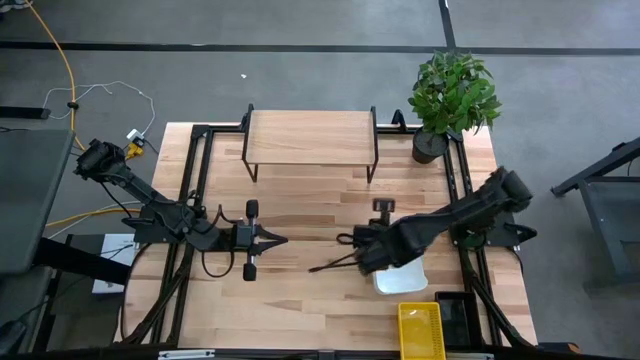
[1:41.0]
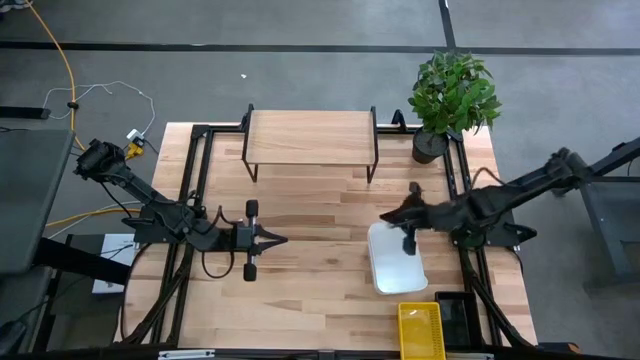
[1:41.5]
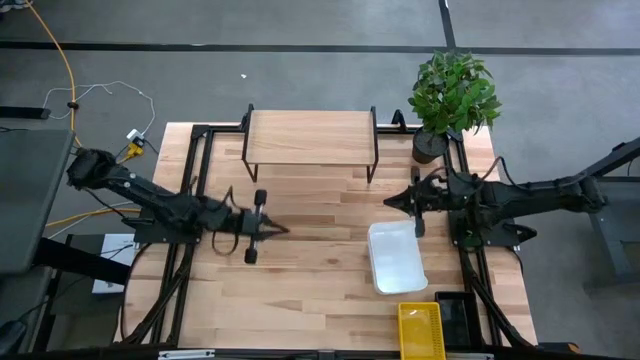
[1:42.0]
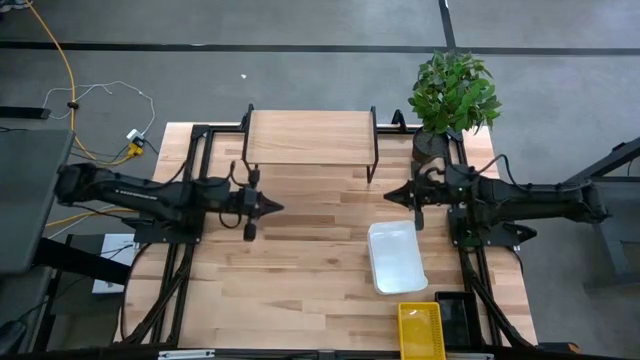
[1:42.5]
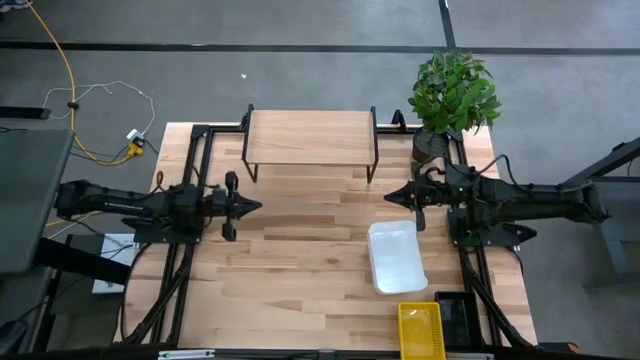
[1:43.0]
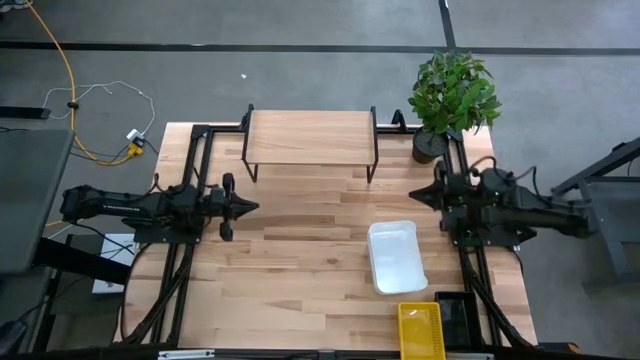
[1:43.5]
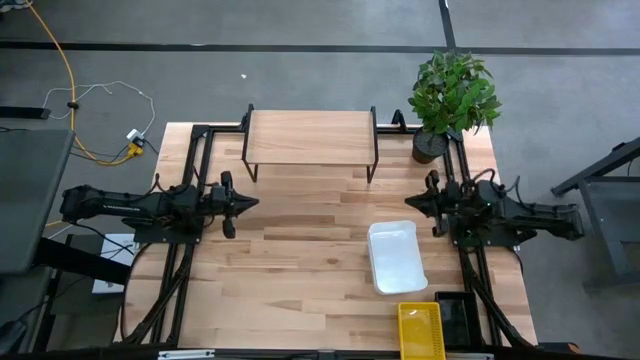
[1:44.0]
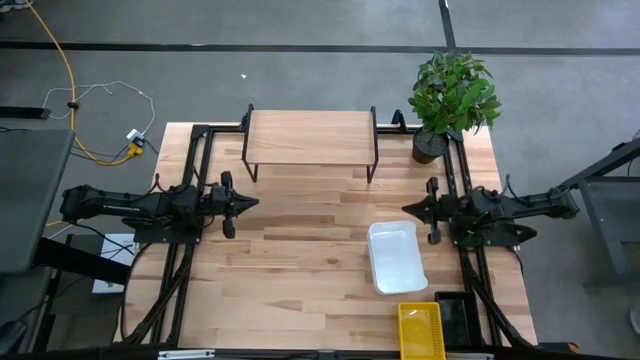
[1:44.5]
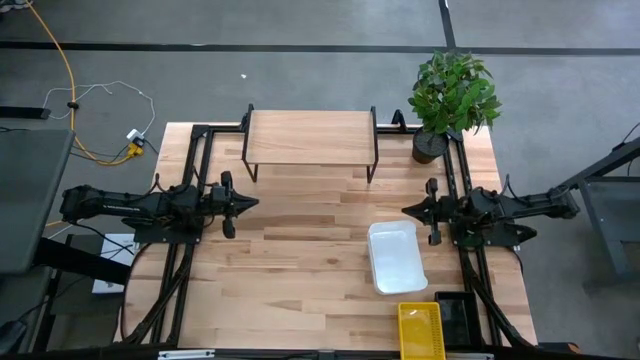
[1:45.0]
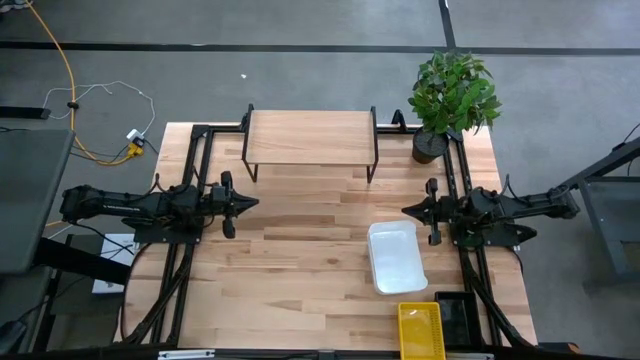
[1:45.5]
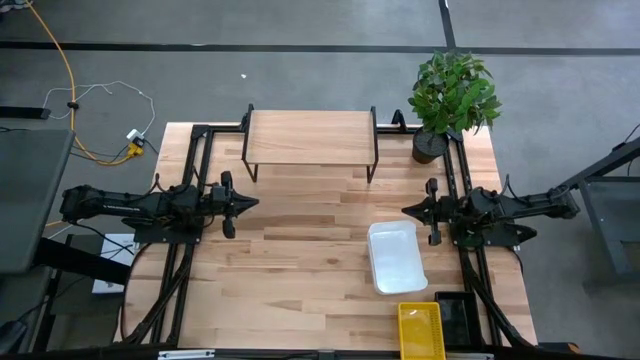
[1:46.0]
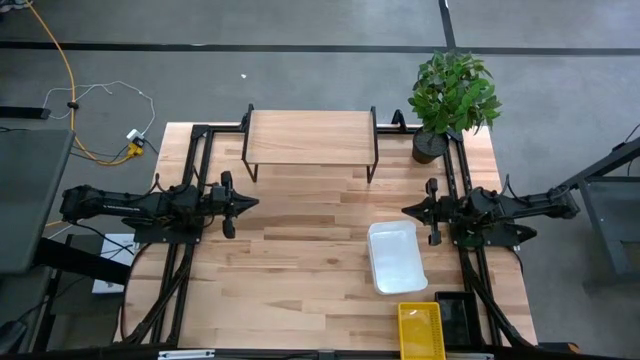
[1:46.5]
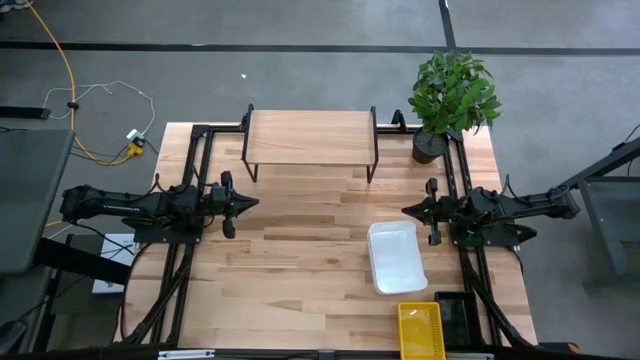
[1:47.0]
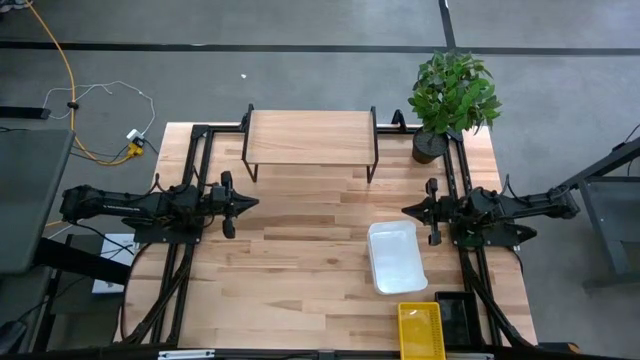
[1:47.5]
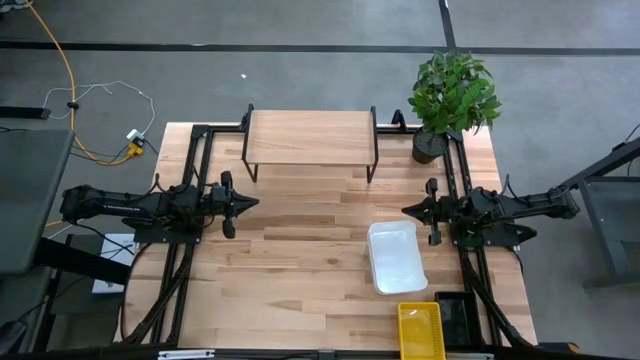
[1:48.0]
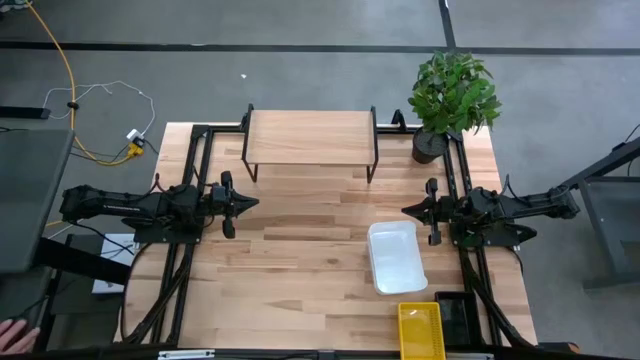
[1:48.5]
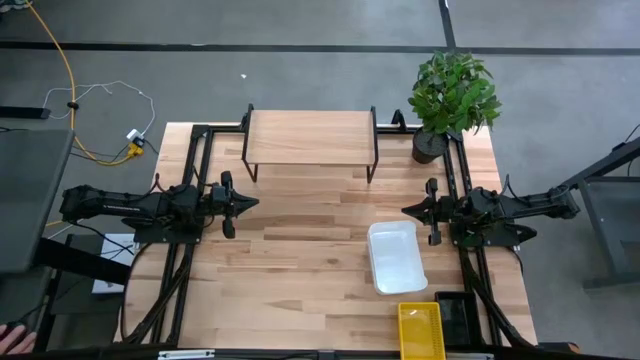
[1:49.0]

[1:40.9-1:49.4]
Task: Stack baskets on shelf by color
Return to Home Position

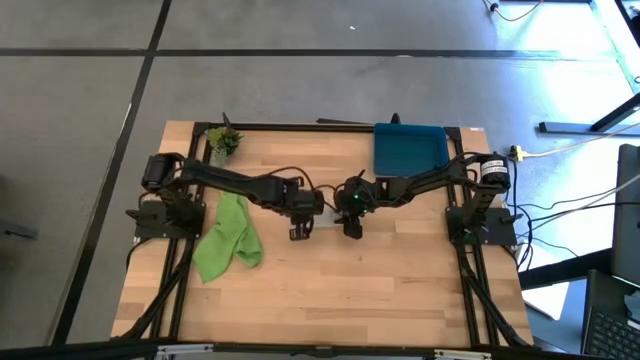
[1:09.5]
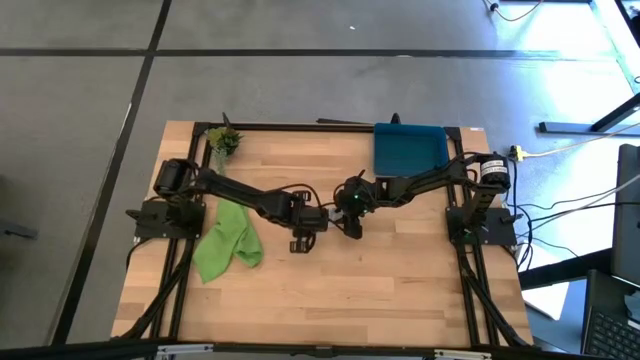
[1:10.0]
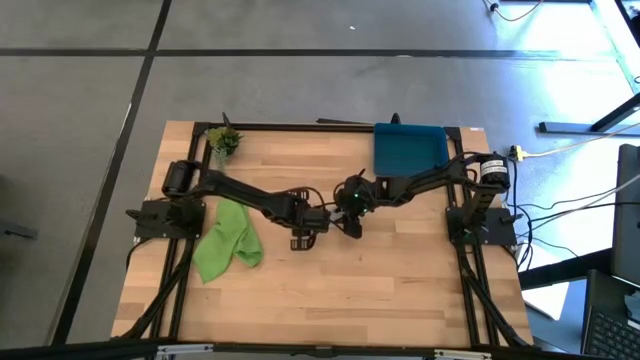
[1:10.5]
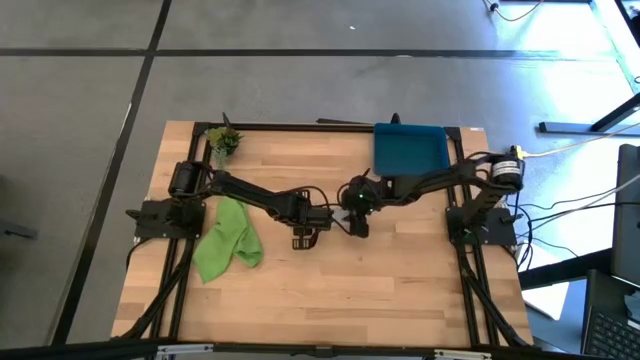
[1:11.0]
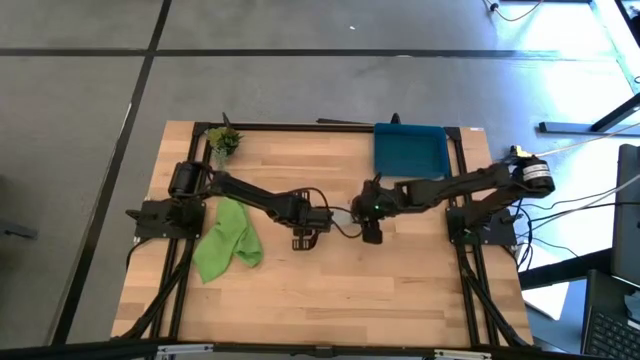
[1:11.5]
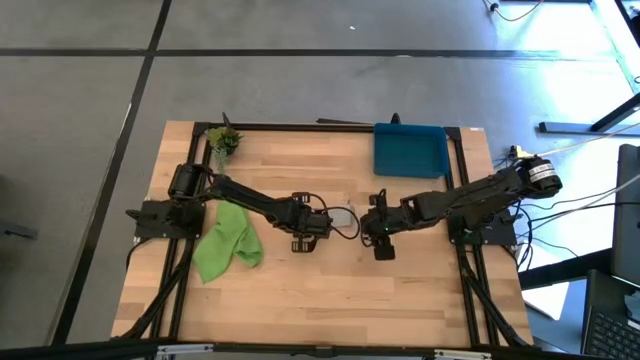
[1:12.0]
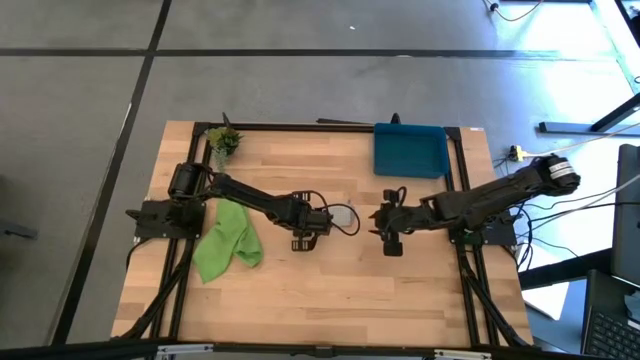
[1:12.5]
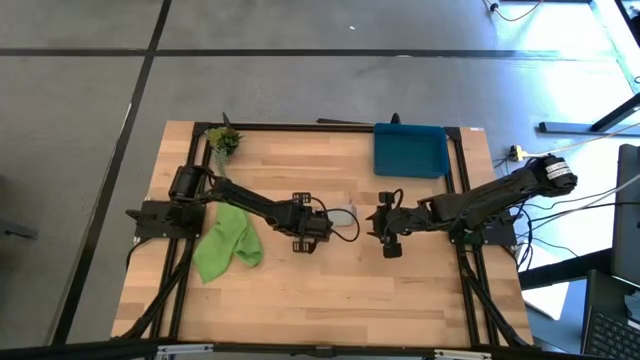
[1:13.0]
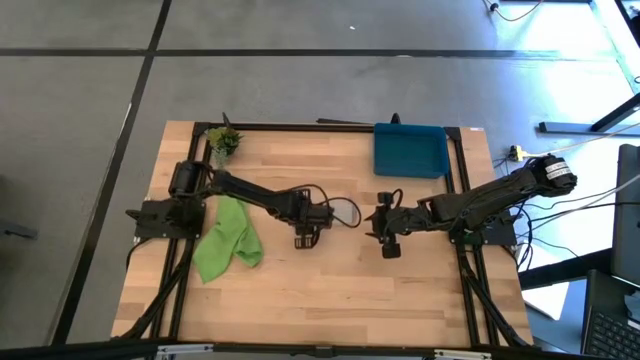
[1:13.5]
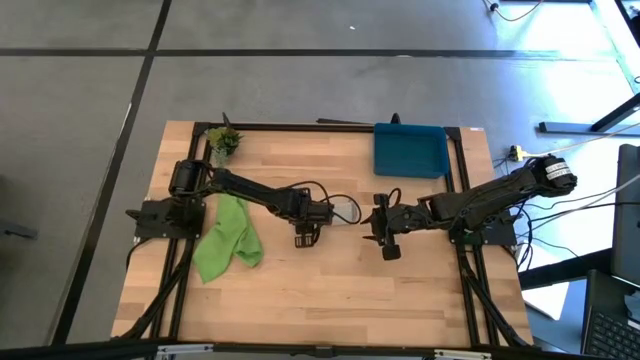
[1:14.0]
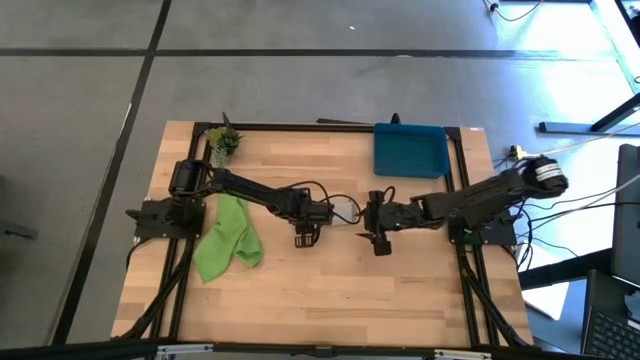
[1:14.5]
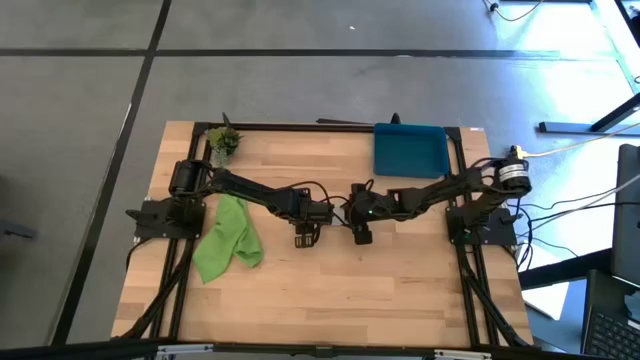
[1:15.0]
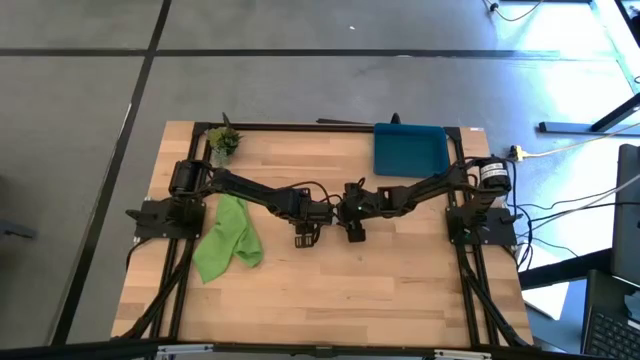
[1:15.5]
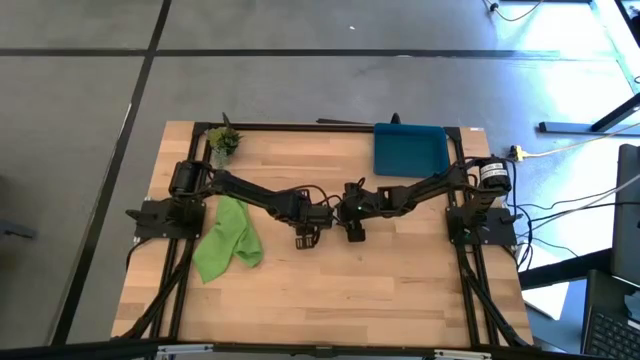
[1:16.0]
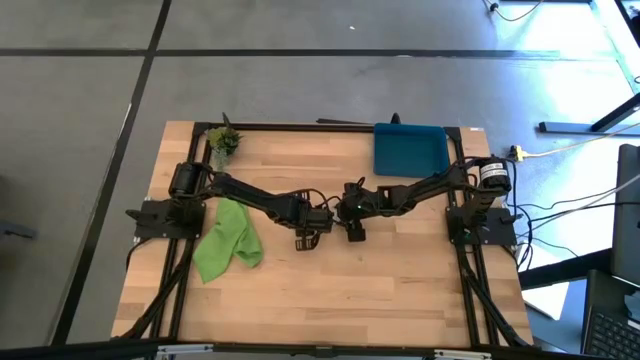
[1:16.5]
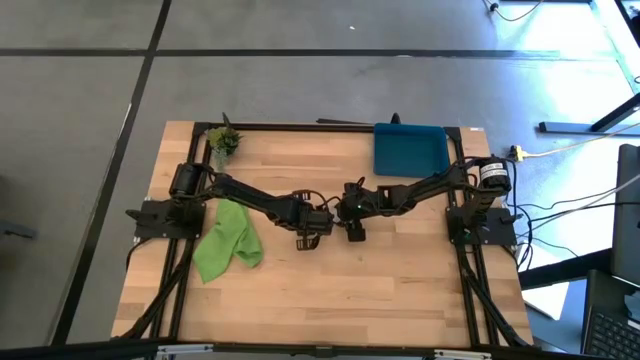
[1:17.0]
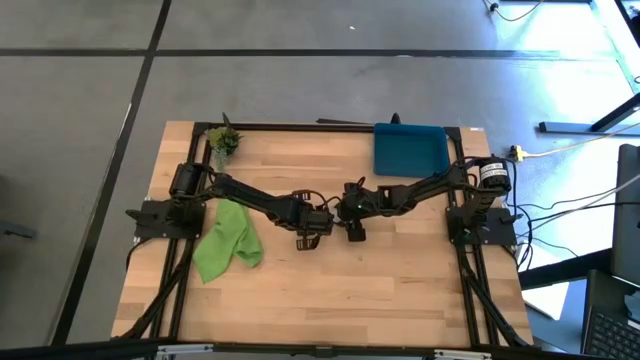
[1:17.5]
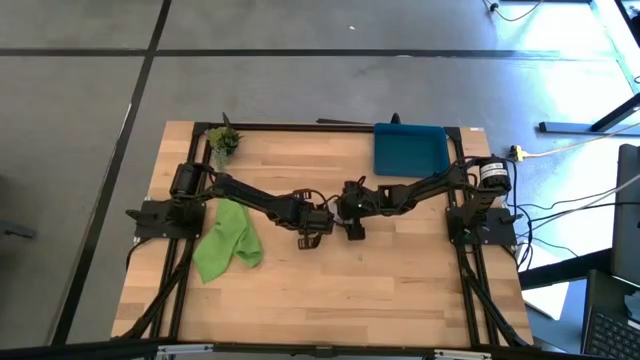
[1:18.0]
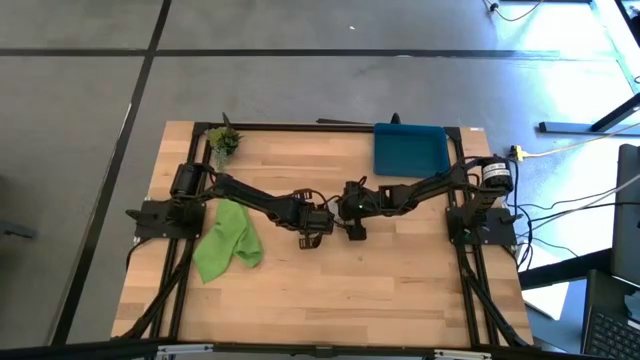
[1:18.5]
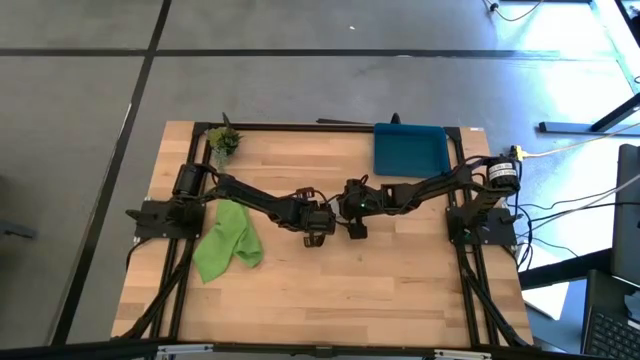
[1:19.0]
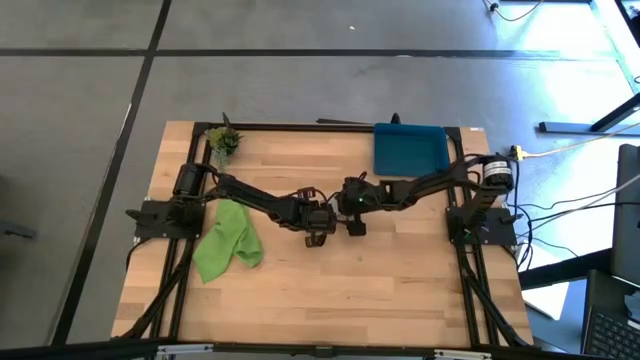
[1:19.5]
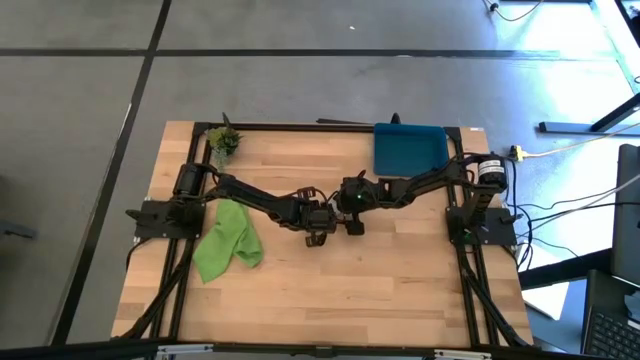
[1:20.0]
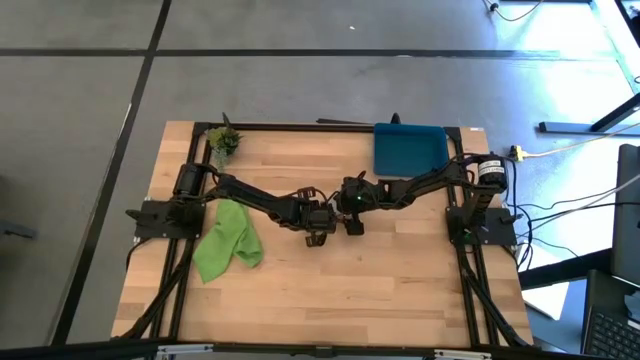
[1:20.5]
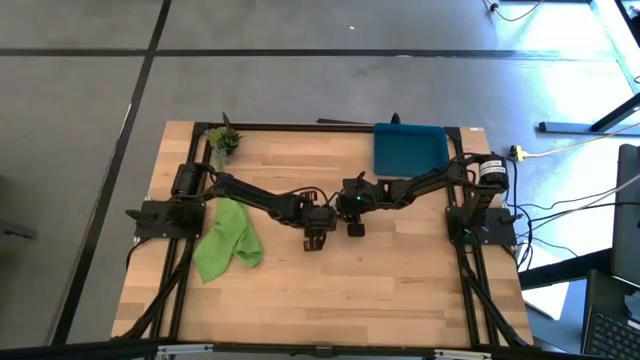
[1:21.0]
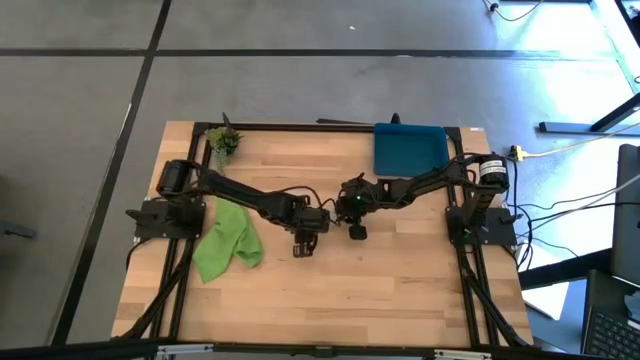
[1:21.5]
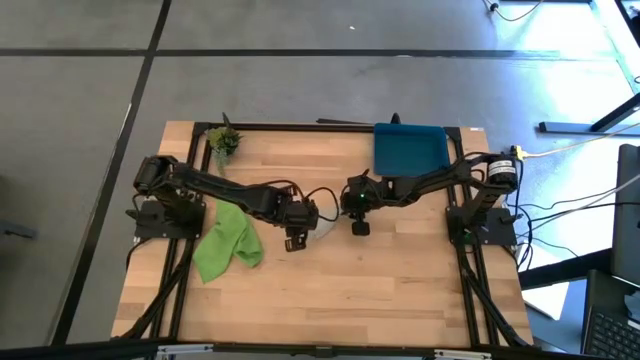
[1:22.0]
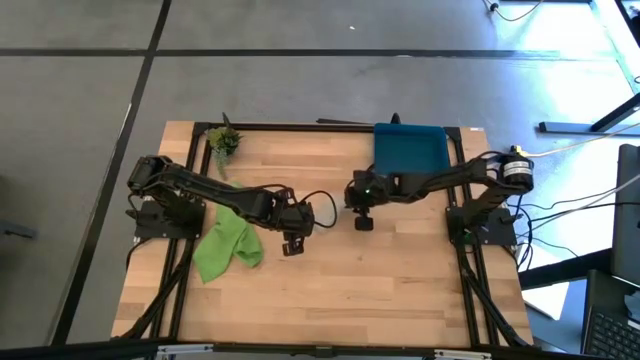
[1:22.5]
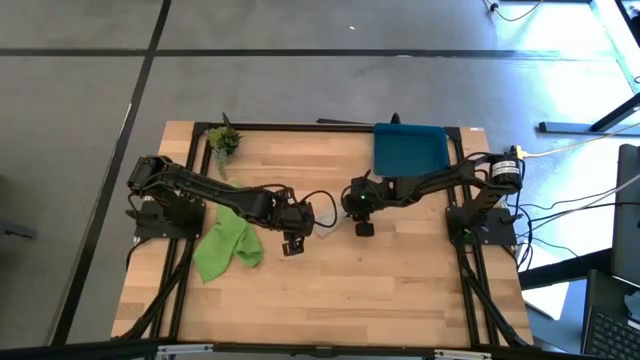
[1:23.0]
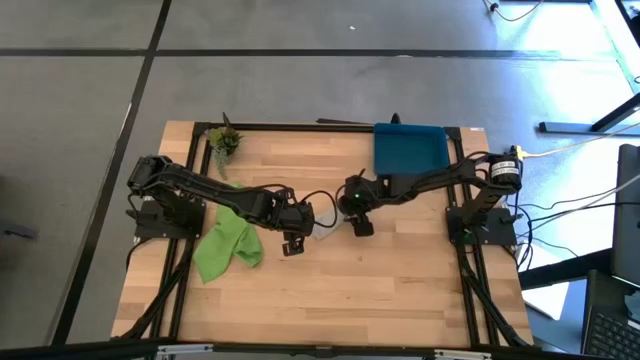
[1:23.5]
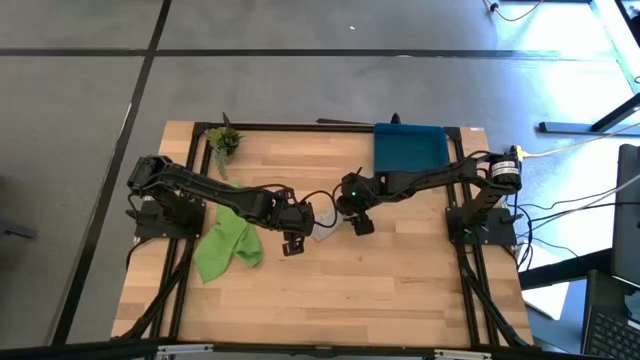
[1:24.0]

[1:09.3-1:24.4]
Task: Roll microfiber towels into tight, uniform cylinder then place into a basket
Put the rolled gray microfiber cloth into the blue bin
